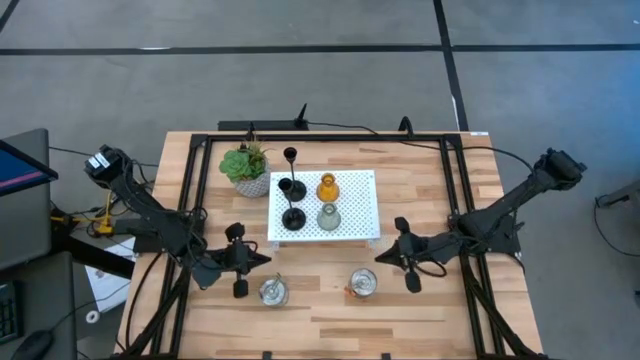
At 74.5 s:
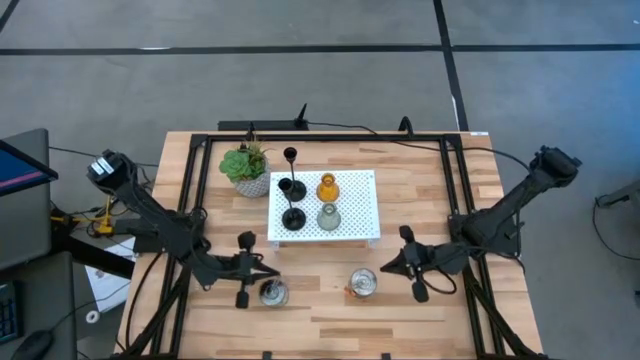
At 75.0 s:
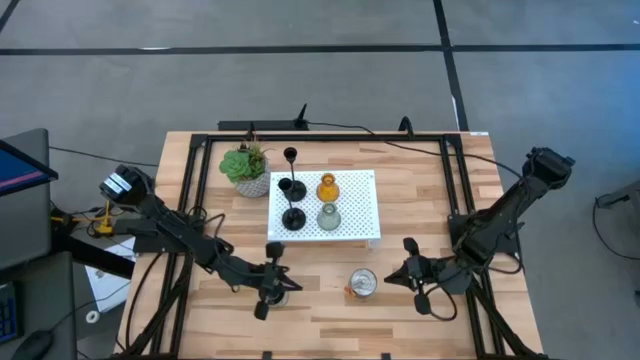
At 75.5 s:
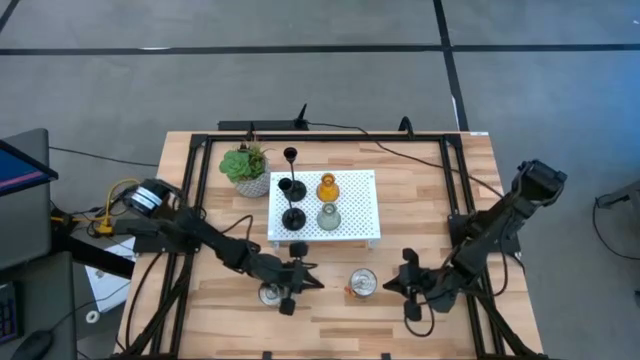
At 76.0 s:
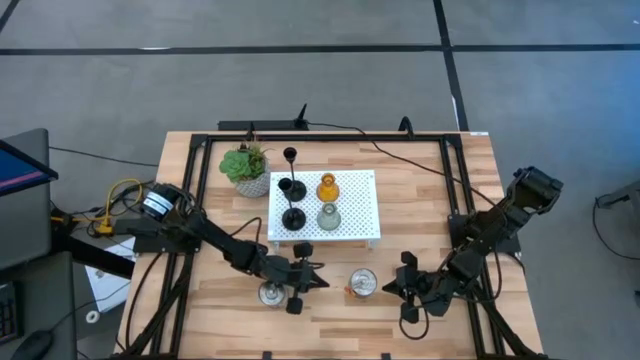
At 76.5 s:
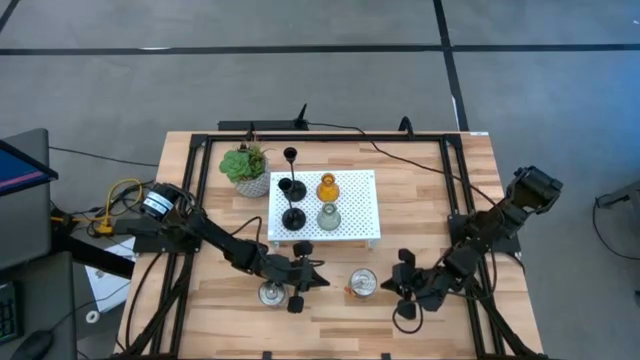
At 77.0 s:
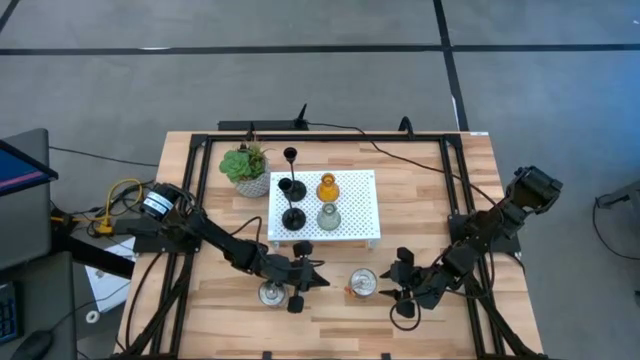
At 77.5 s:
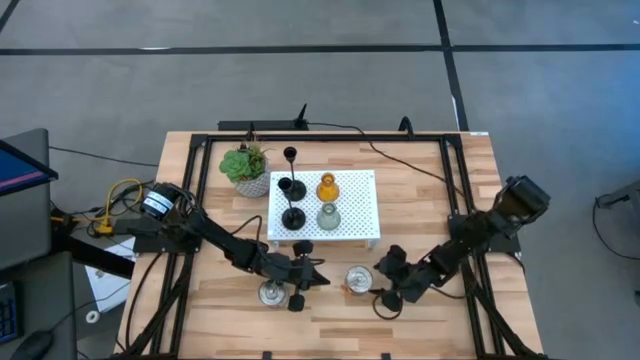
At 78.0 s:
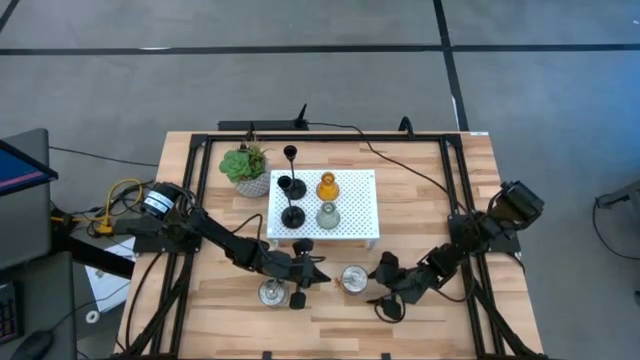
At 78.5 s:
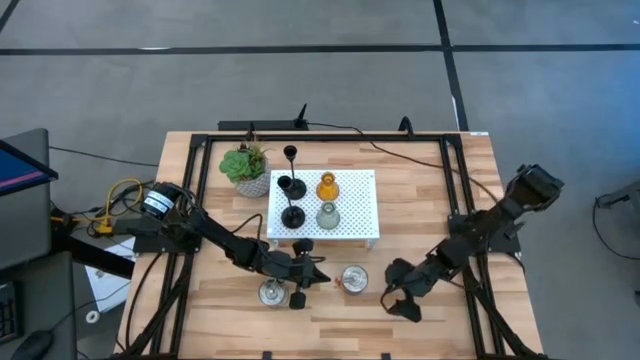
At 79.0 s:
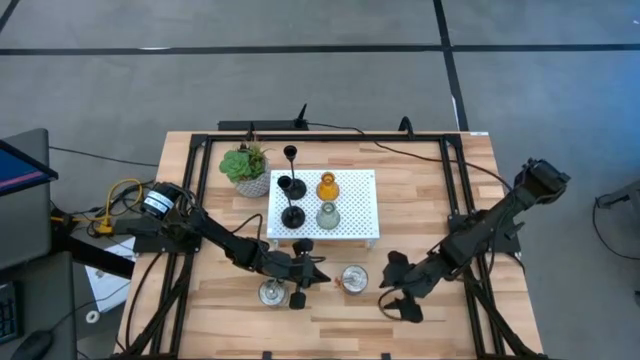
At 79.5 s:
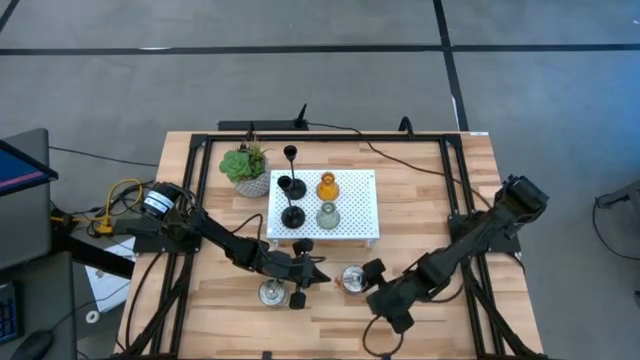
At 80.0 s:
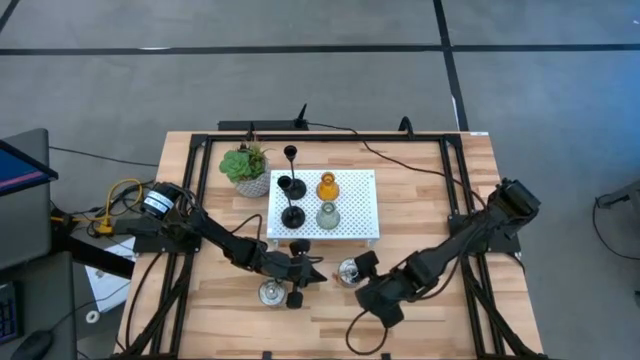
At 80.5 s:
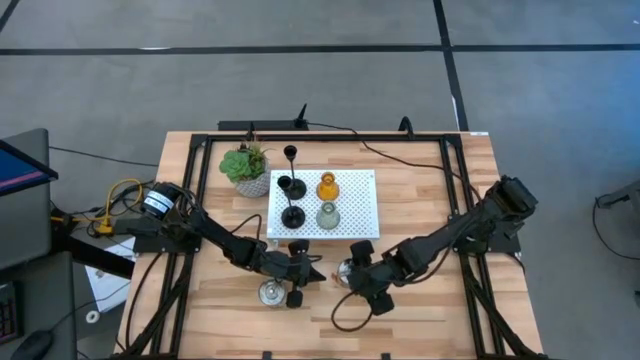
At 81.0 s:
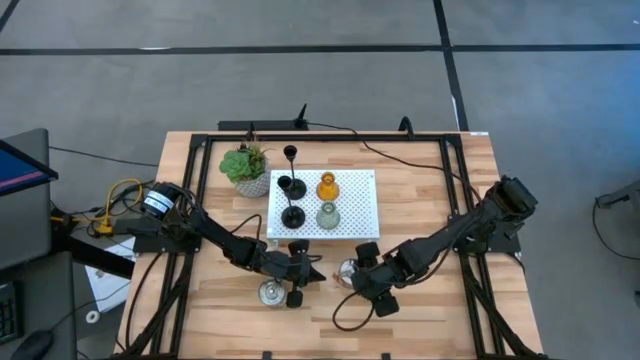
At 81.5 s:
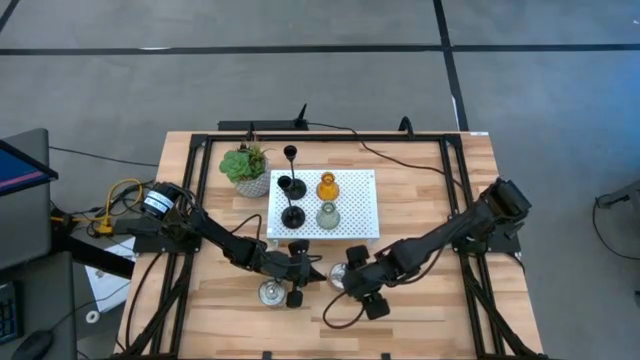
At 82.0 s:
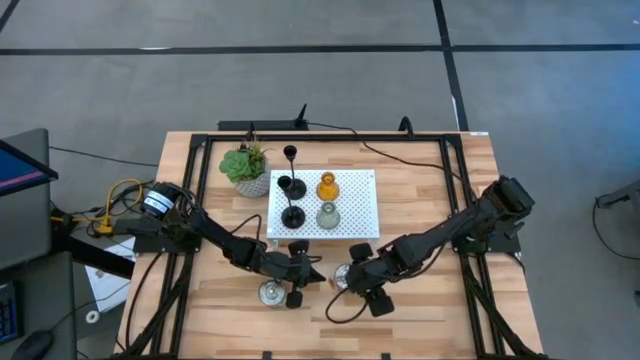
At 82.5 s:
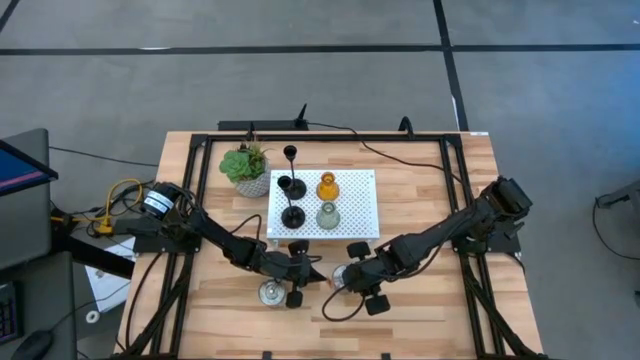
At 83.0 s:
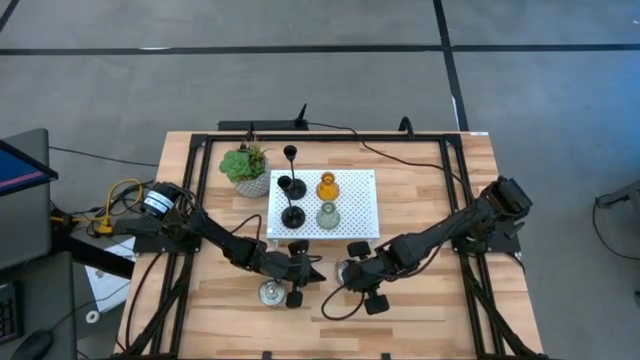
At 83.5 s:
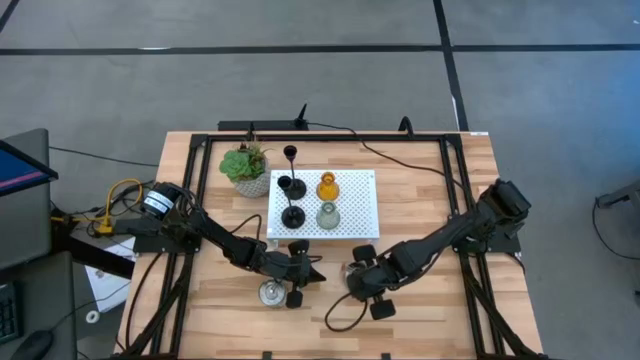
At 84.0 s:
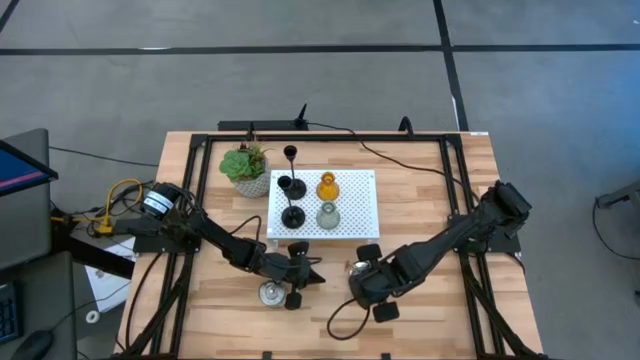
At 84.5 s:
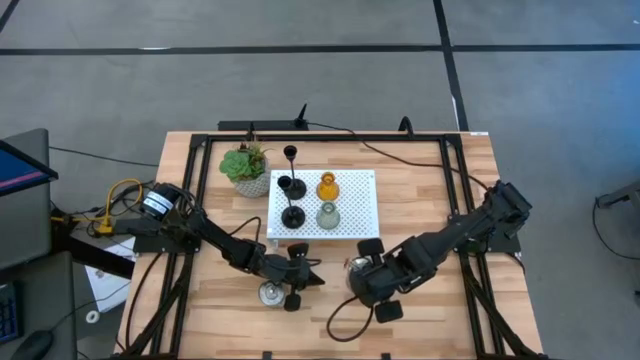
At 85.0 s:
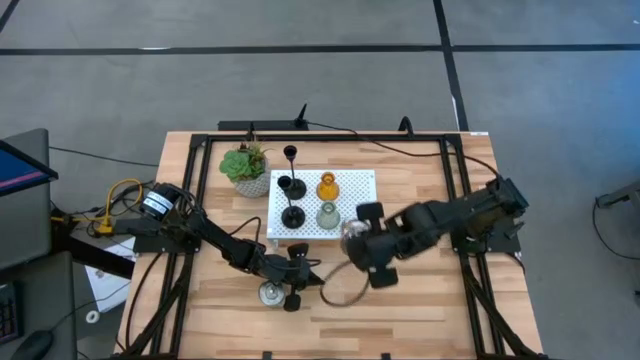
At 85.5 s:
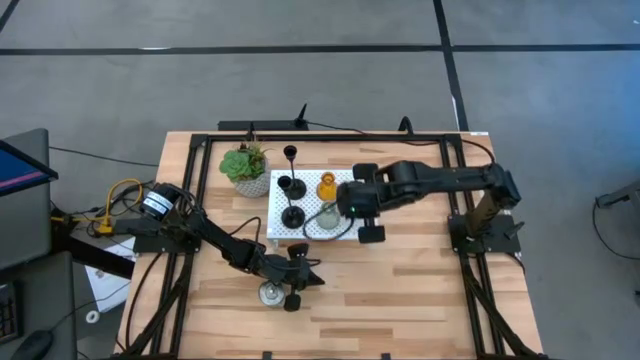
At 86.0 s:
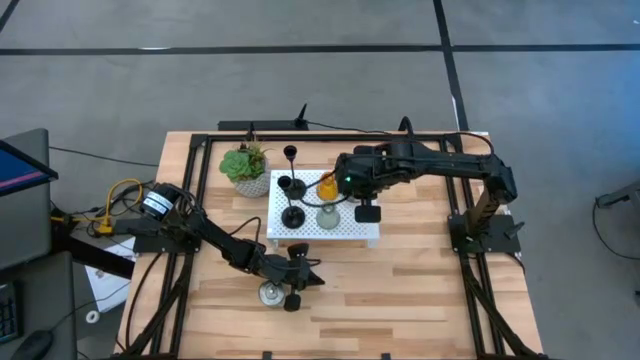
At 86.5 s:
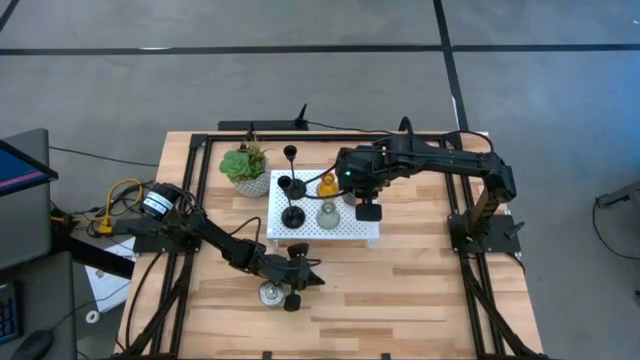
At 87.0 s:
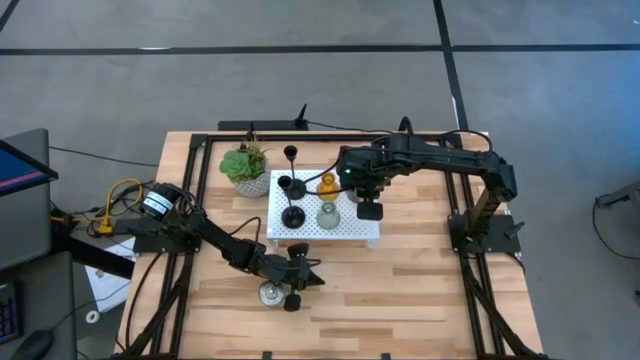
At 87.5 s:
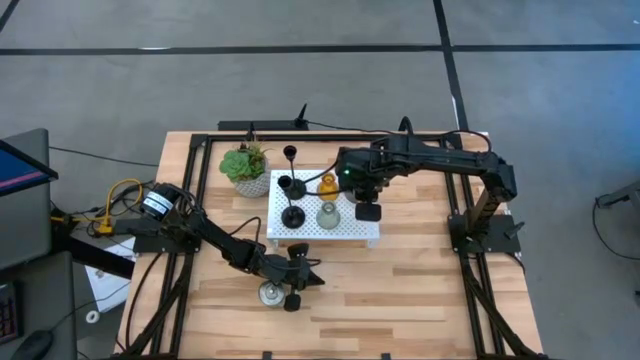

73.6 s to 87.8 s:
Task: Pick & Place candle stick holders
Put the right orange scented candle on the shelf
